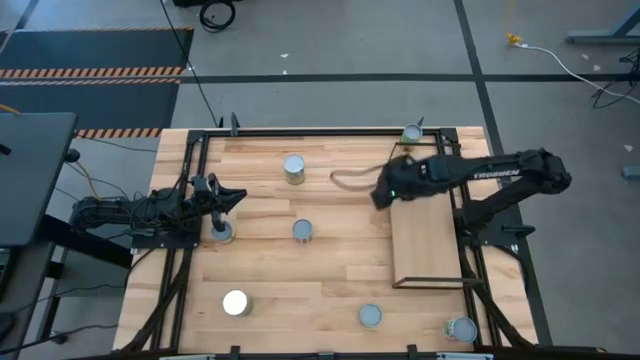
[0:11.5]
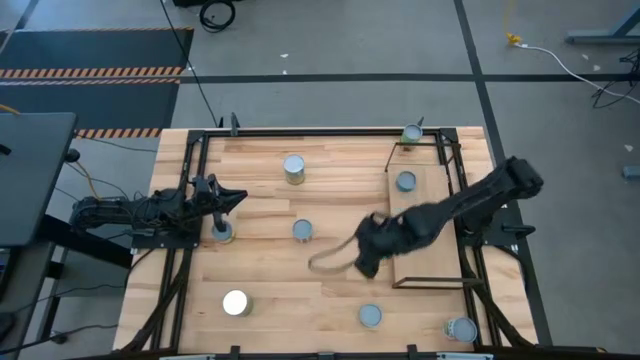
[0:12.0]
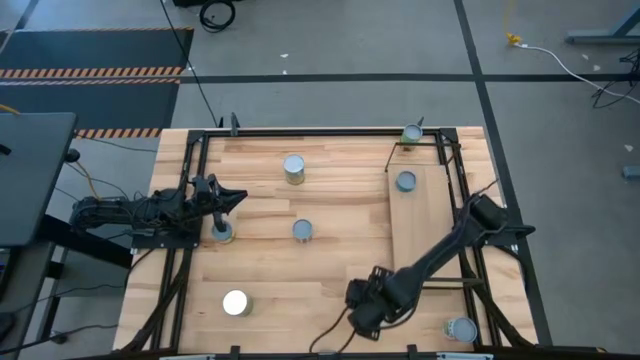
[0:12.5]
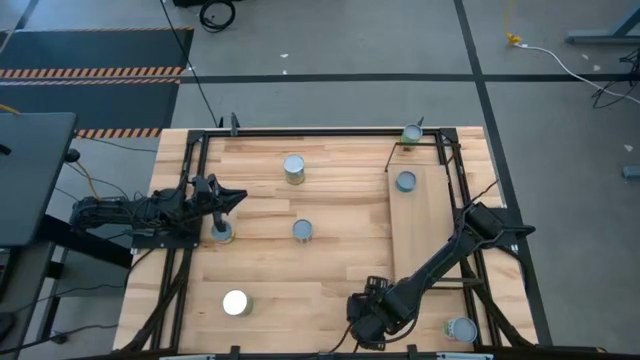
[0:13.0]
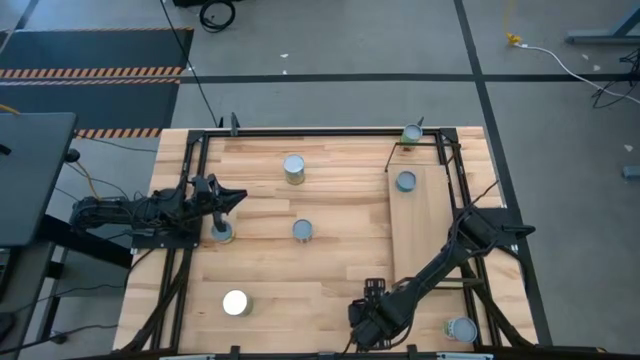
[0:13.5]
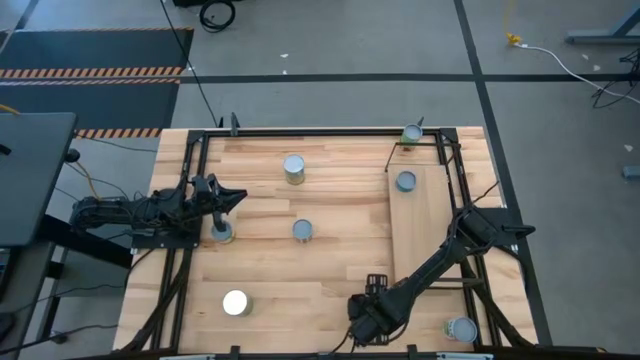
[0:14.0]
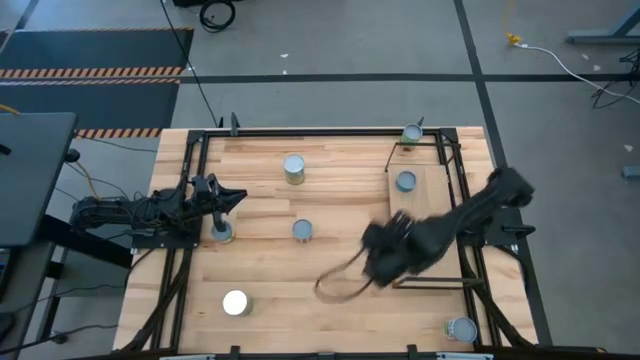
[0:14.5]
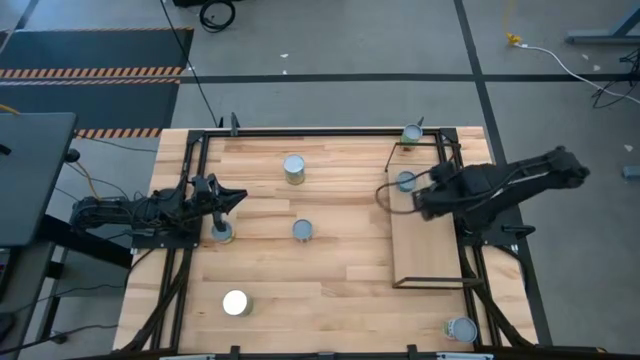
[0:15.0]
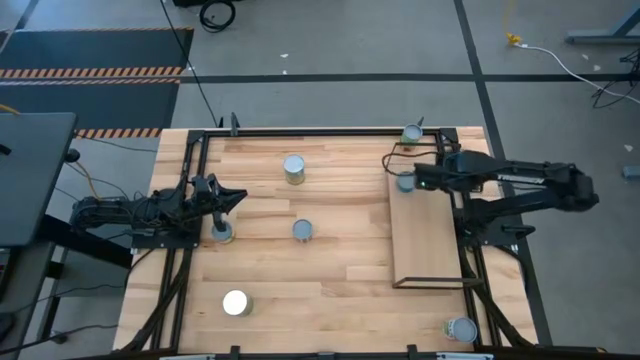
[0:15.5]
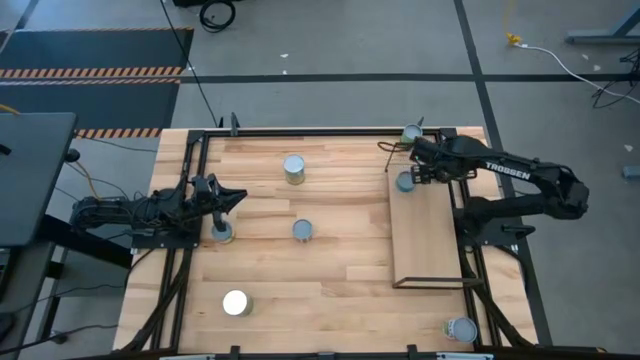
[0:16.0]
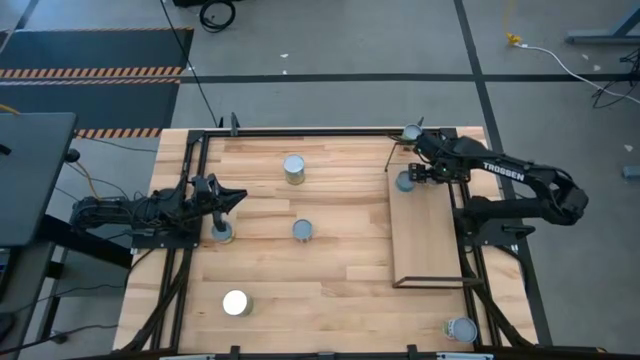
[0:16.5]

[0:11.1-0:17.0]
Task: Pick and place cans onto a shelf
Put the yellow can on the shelf

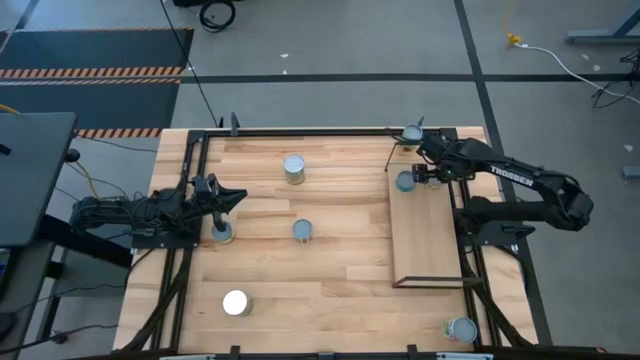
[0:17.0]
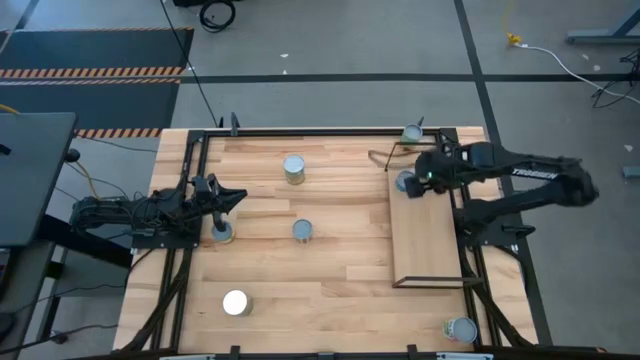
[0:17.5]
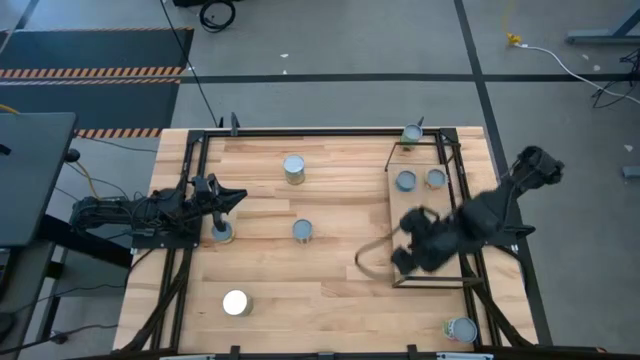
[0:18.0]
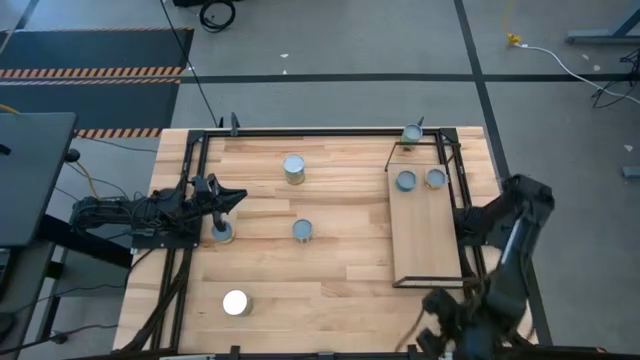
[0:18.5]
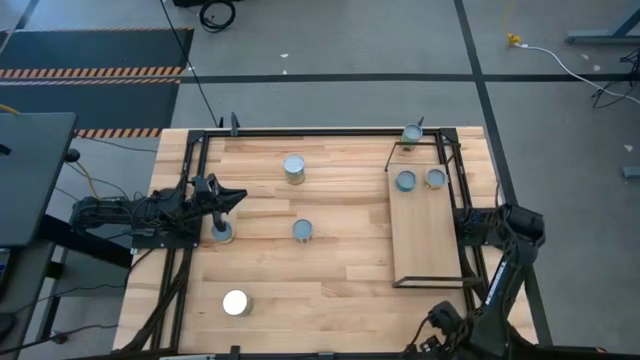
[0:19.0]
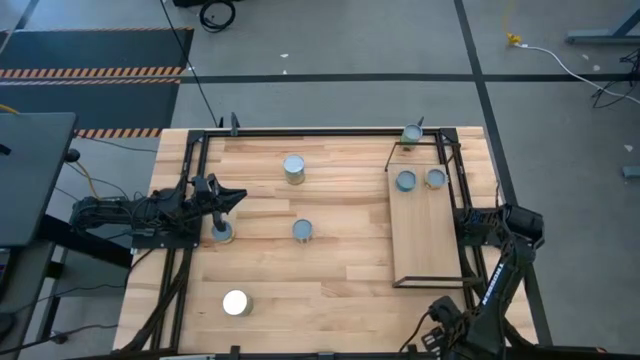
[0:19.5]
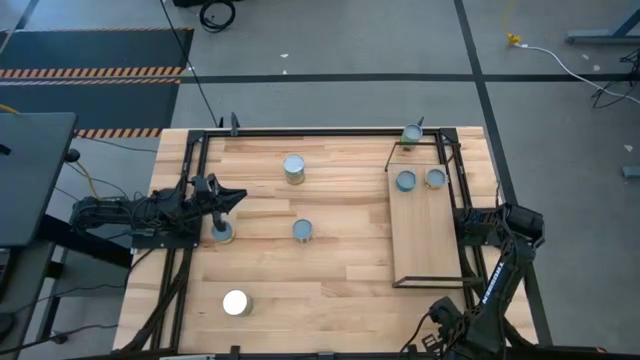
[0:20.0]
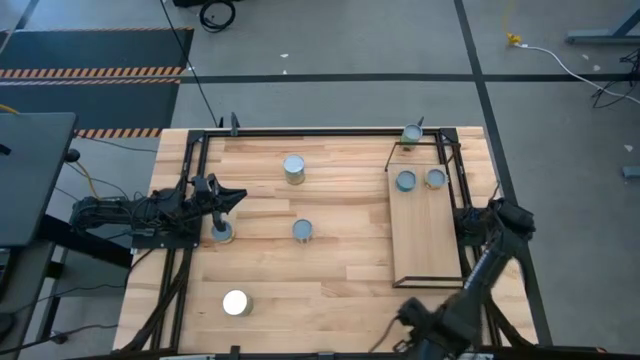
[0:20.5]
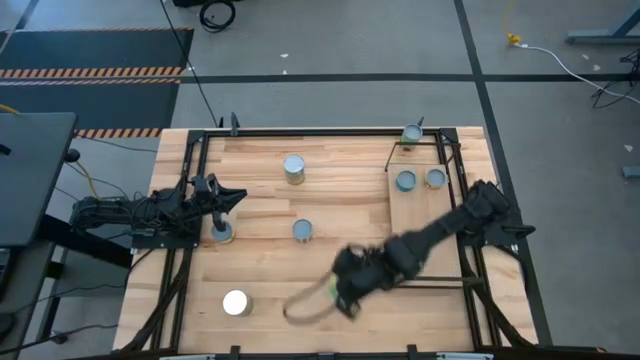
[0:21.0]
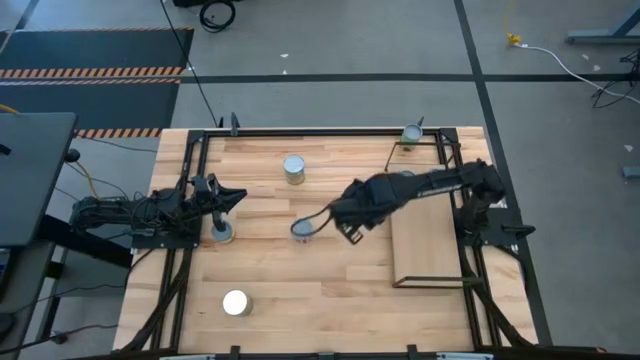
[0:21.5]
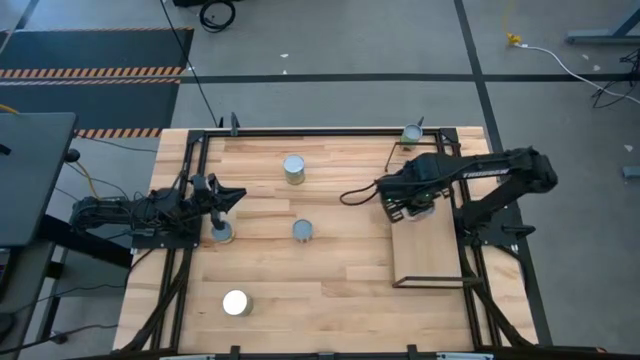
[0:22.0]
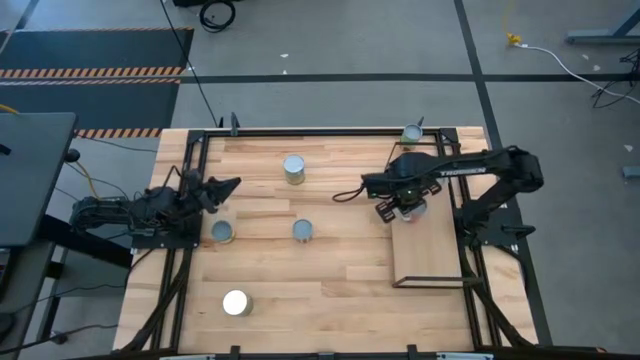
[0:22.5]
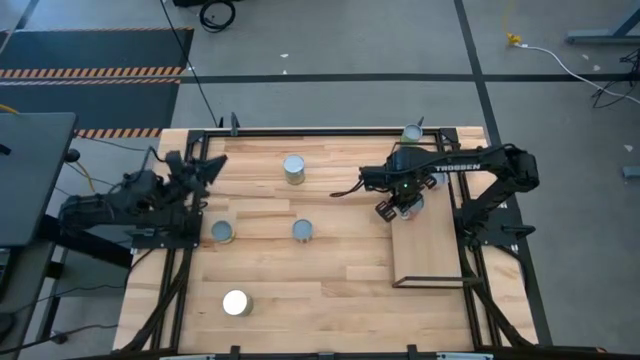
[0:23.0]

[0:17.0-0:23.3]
Put the canned mix fruit on the shelf

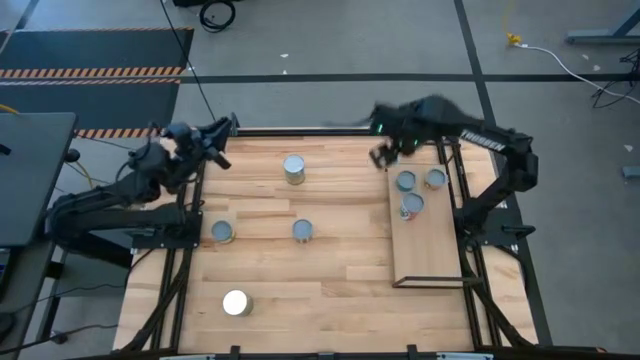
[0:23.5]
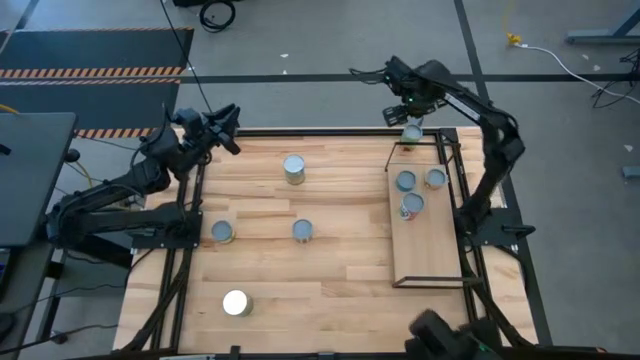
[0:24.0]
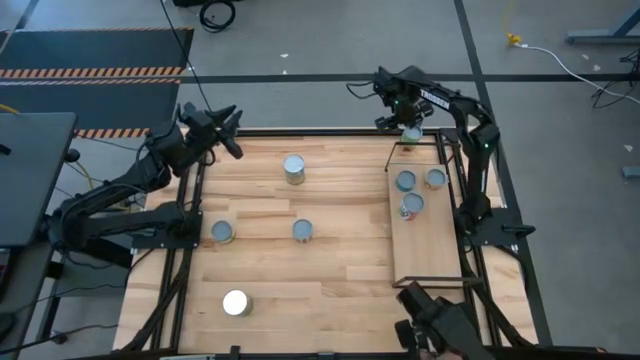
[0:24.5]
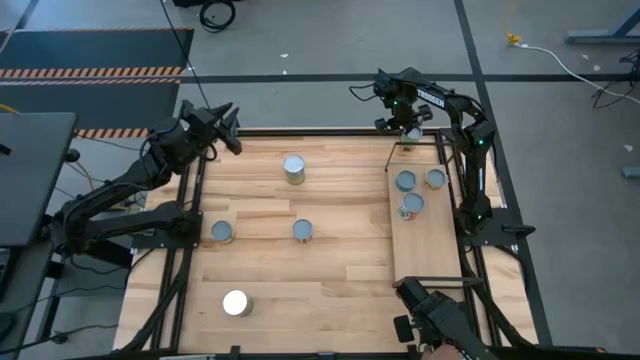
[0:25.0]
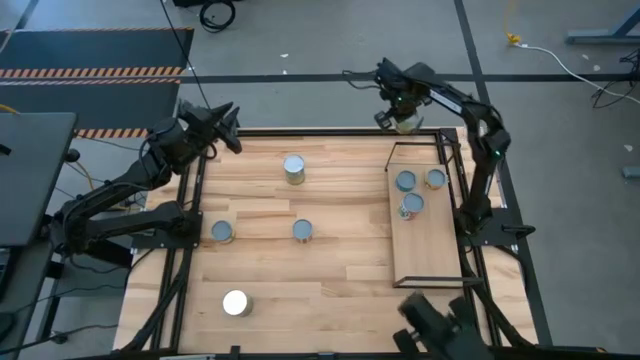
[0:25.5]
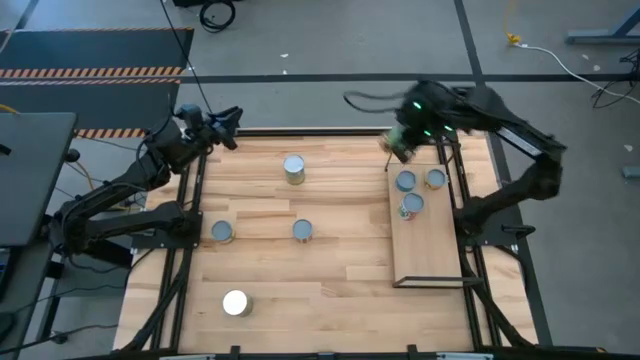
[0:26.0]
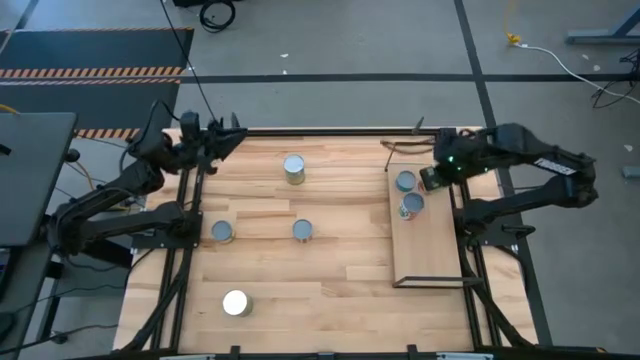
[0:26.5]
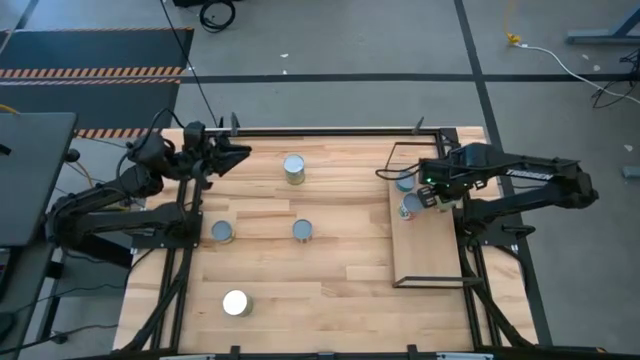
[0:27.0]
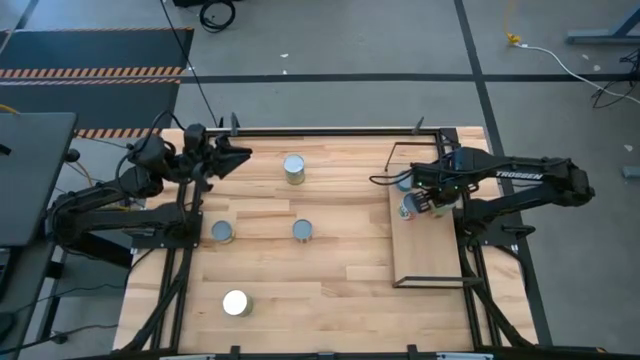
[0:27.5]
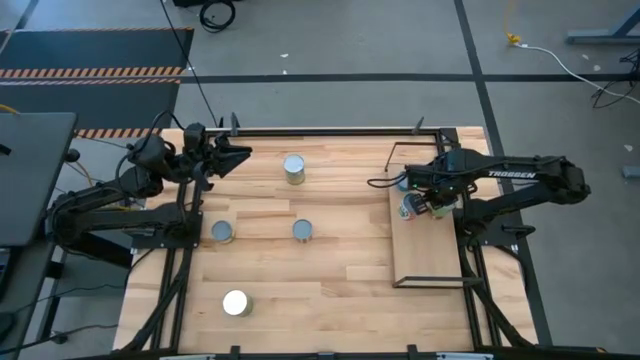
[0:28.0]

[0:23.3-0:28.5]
Put the green can on the shelf

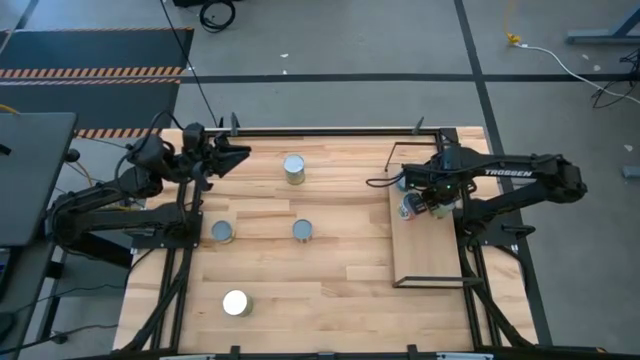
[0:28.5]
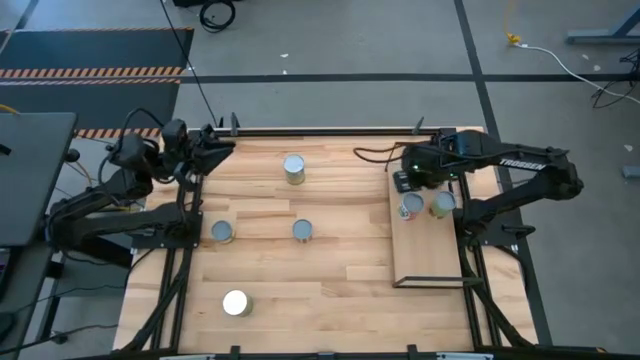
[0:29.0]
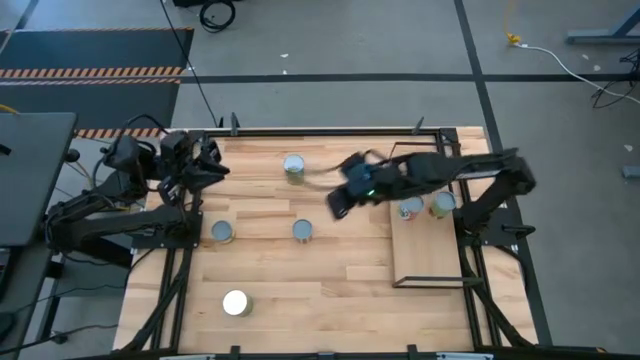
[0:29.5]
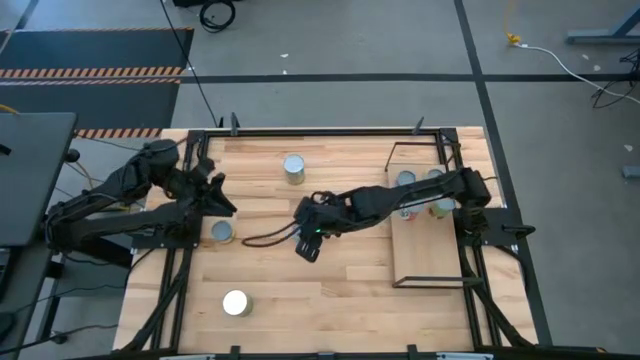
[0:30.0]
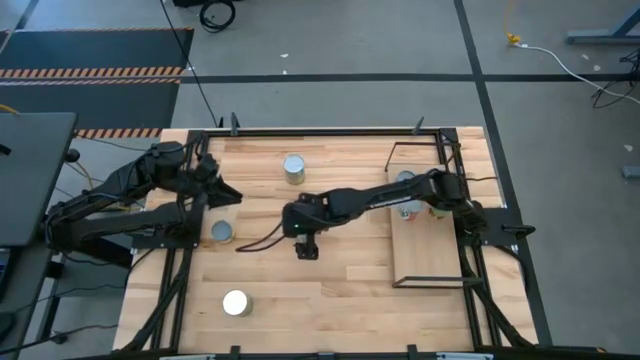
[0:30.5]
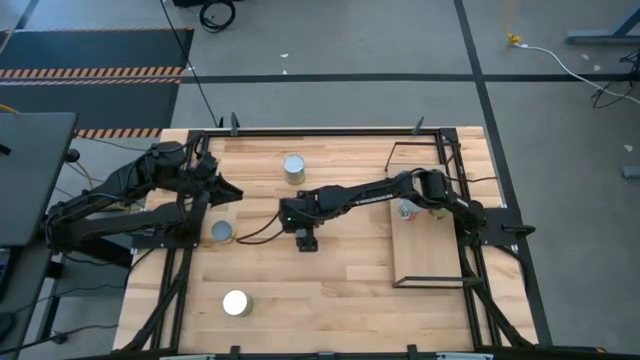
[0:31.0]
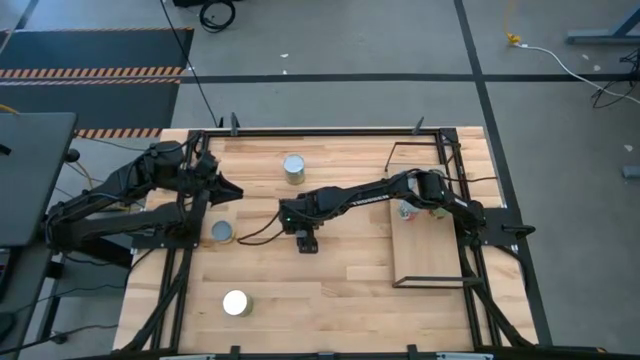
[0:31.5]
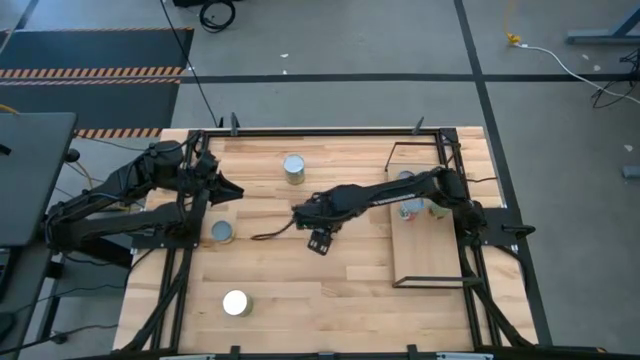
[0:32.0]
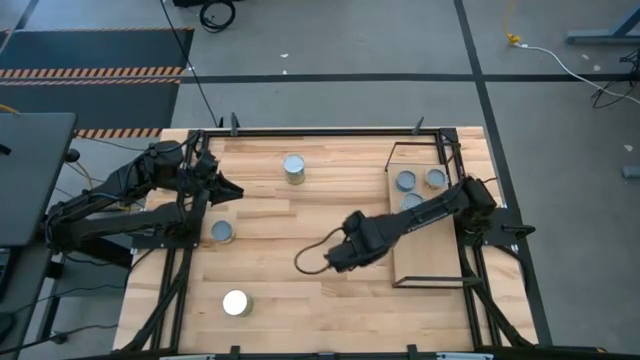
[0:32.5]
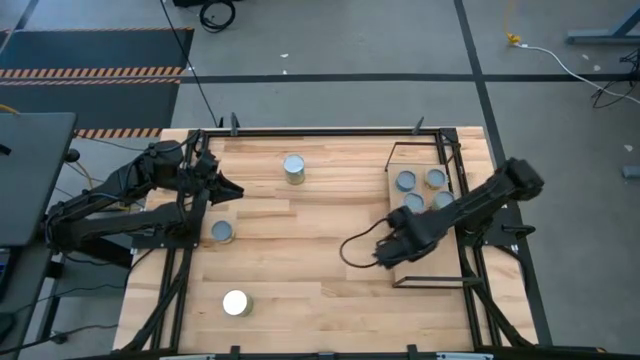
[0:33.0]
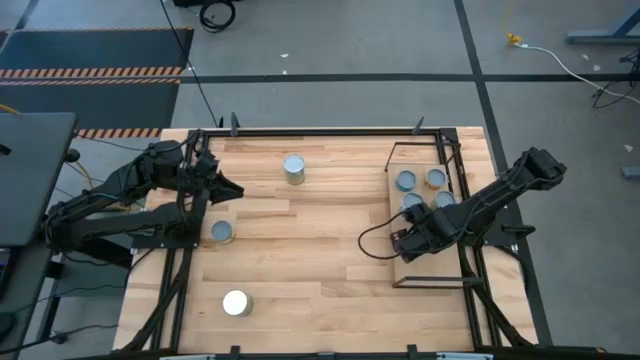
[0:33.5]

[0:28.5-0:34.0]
Put the canned tomatoes can on the shelf
